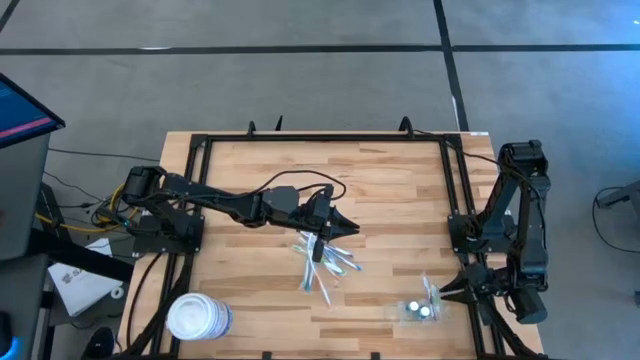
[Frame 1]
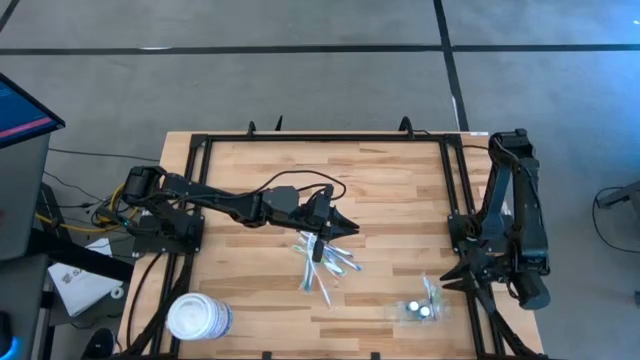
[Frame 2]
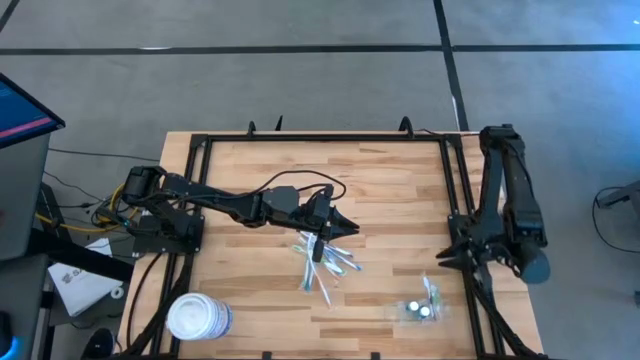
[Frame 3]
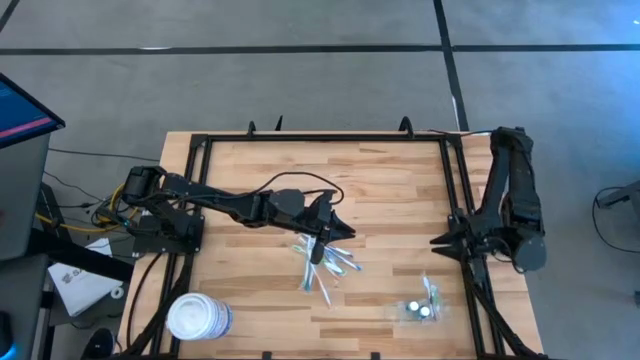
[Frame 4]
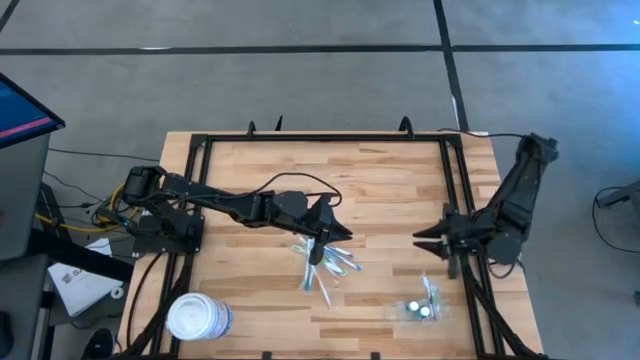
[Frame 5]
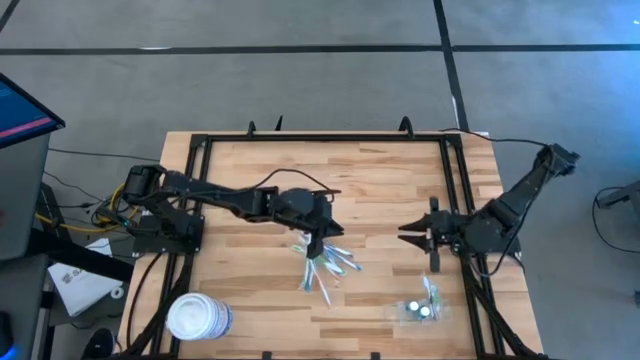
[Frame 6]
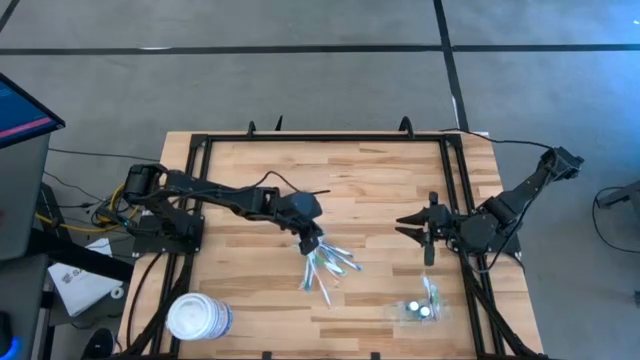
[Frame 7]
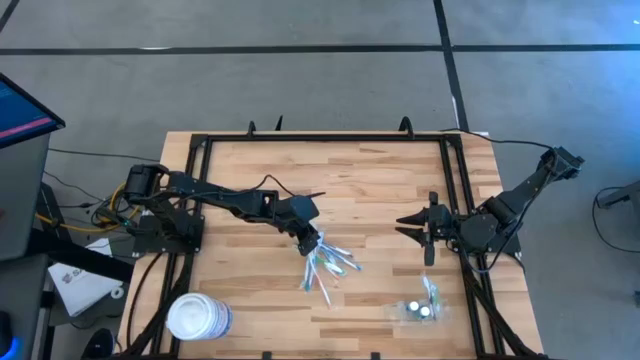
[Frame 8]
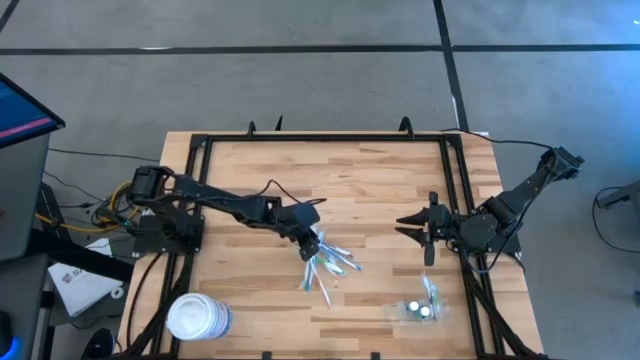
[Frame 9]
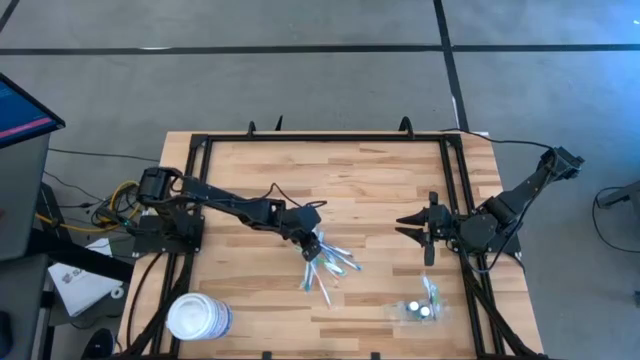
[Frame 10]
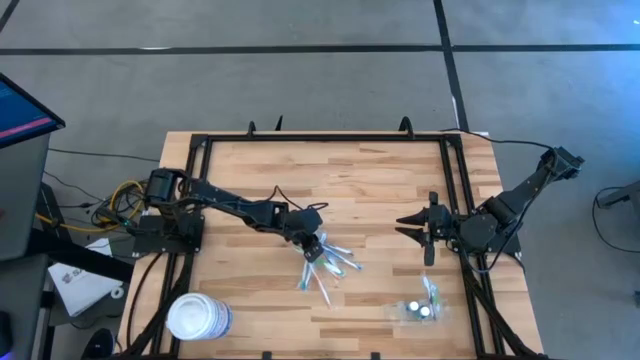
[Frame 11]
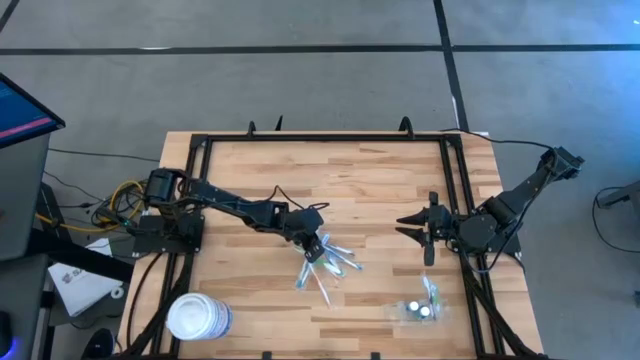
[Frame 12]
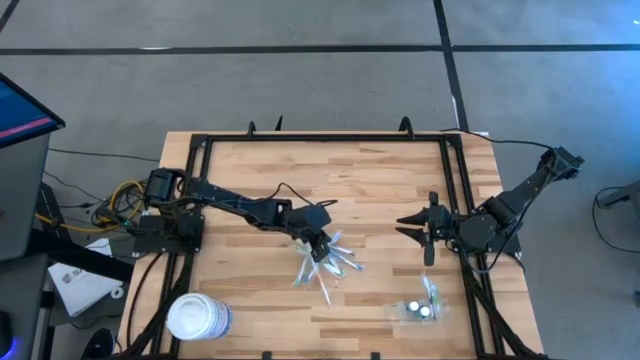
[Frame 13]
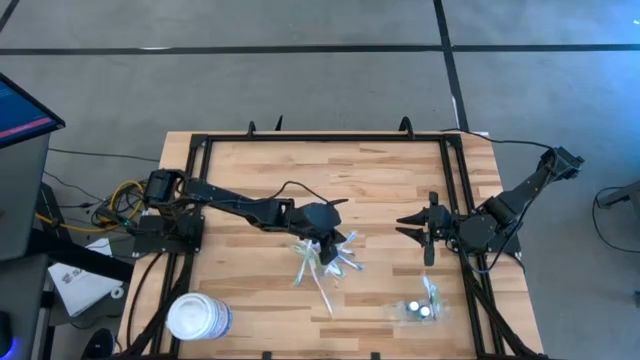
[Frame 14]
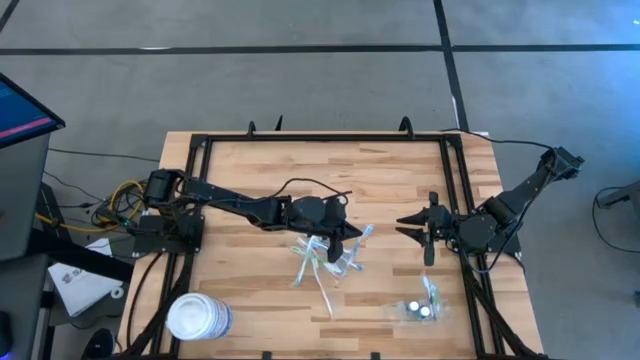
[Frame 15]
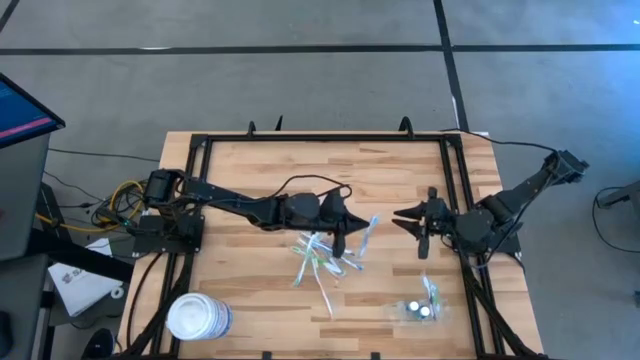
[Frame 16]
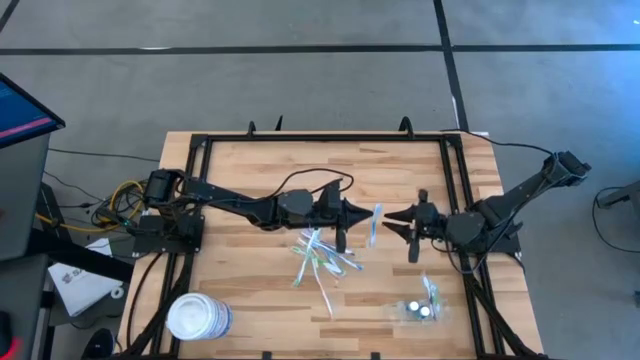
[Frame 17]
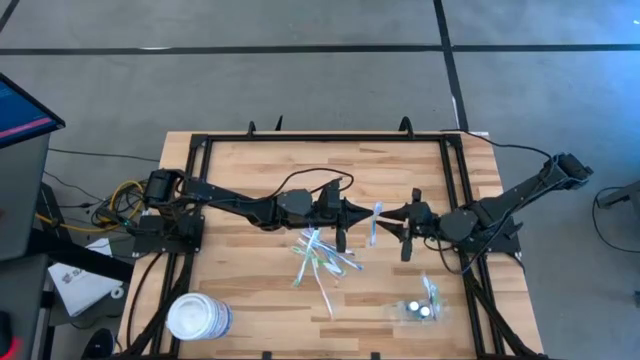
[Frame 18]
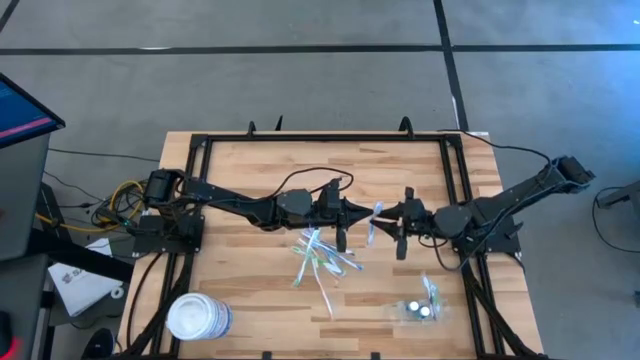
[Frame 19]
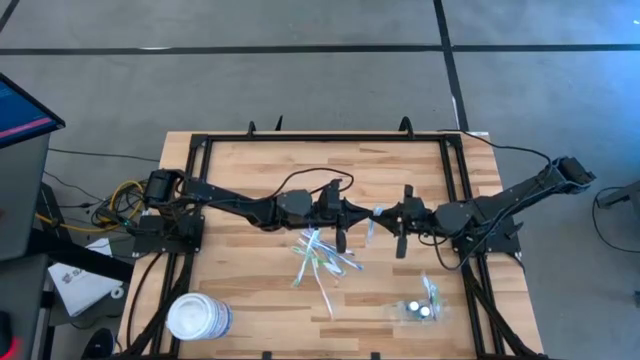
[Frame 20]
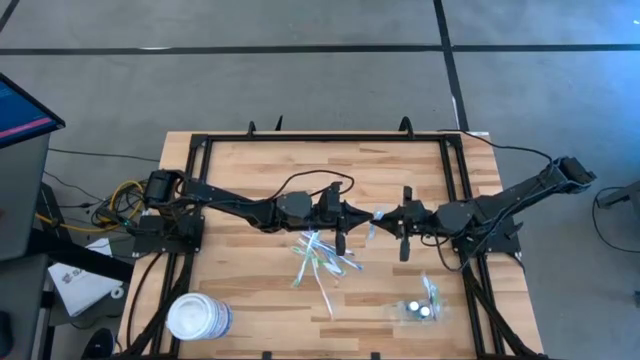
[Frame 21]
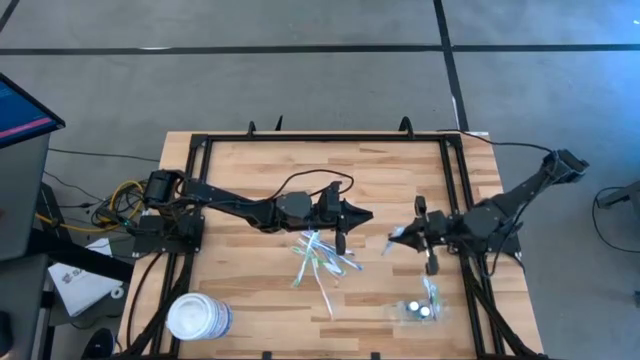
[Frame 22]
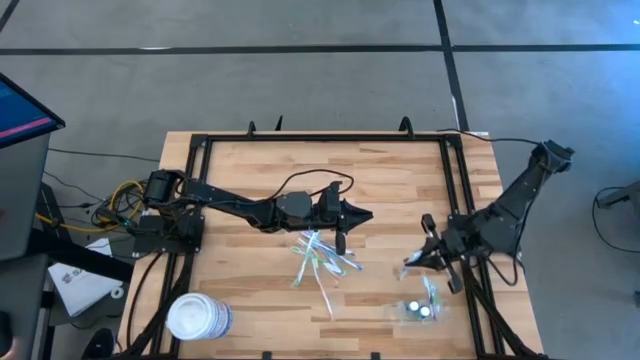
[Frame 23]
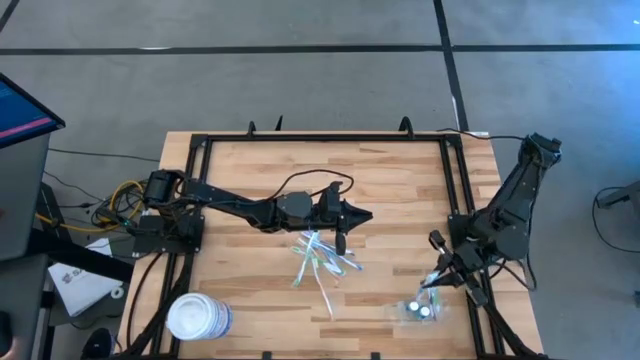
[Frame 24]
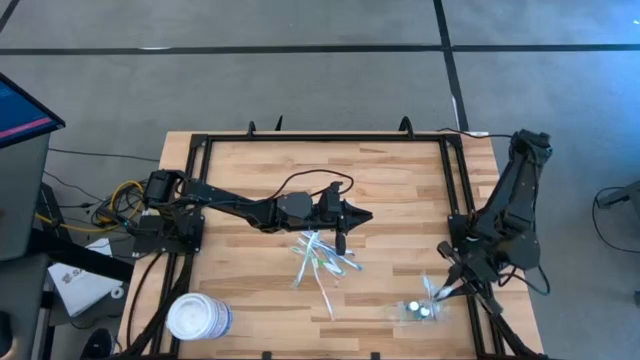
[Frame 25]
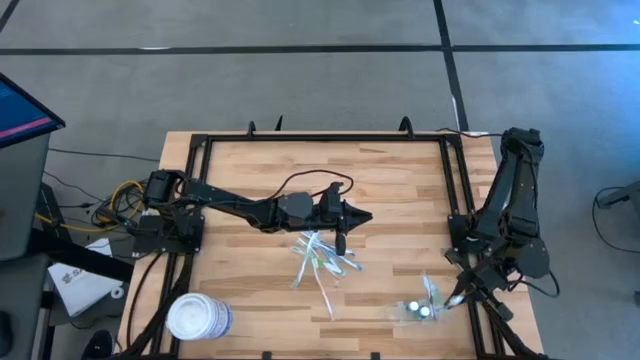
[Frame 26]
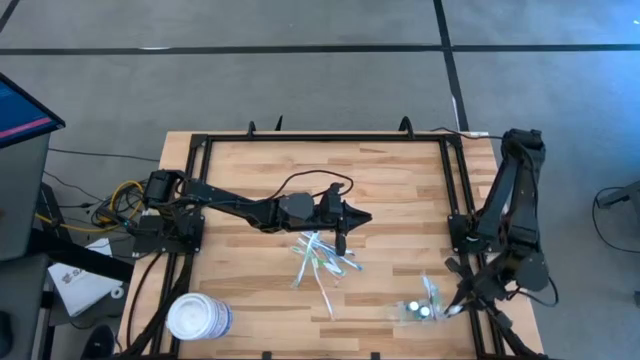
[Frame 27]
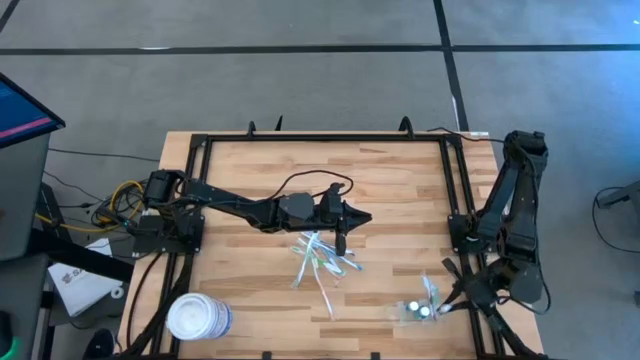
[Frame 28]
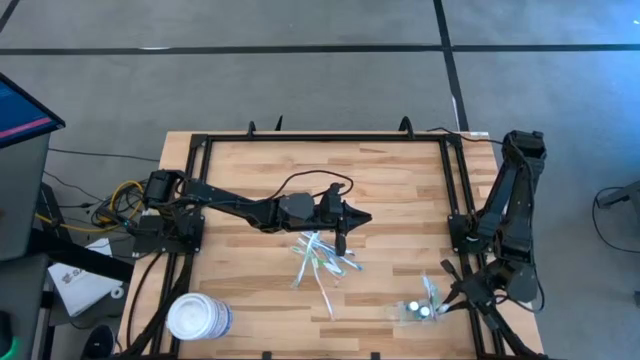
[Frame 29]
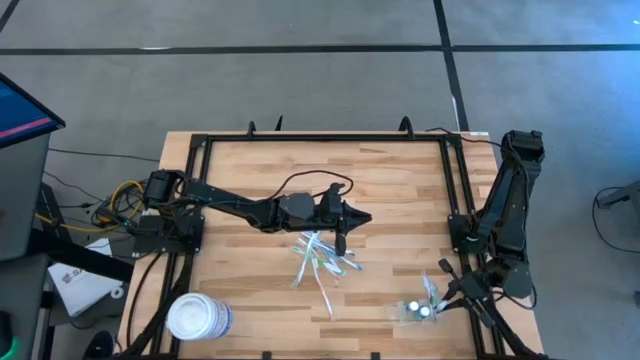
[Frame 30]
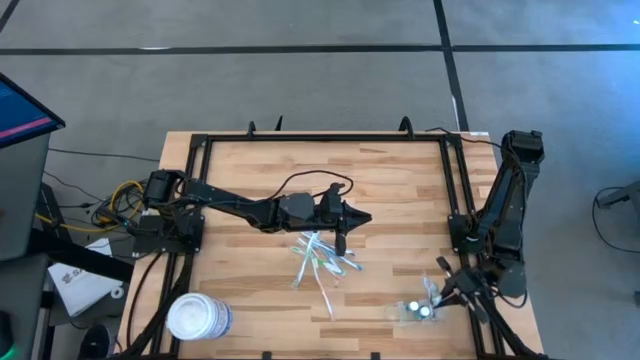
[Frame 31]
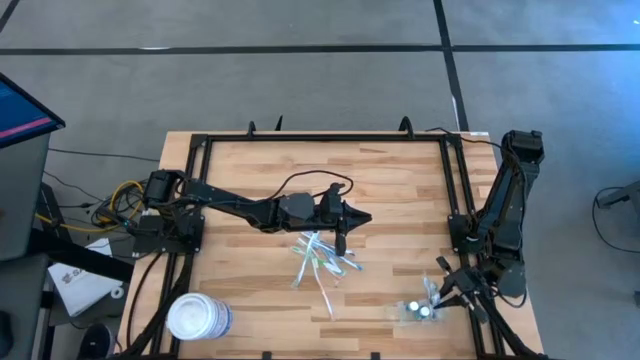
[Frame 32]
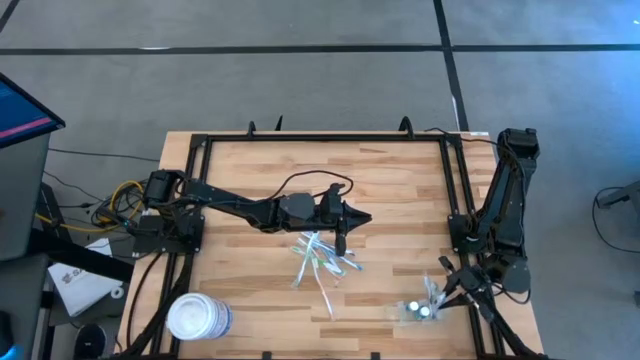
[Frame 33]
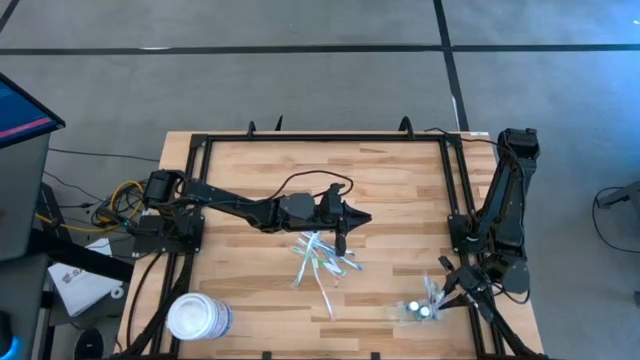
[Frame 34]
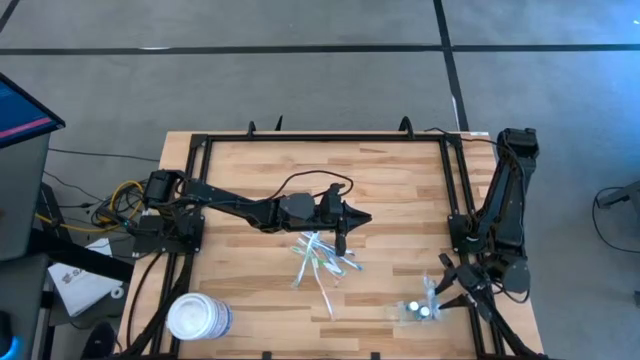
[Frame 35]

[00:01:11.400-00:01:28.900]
Task: Pick & Place toothbrushing station
Put the blue toothbrush into the transparent organizer

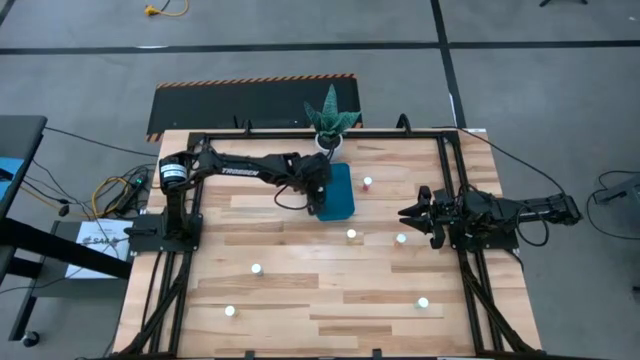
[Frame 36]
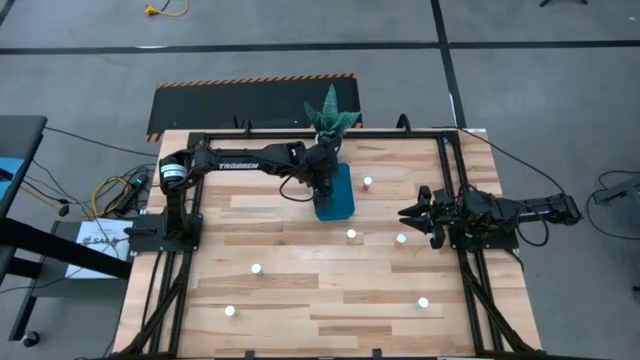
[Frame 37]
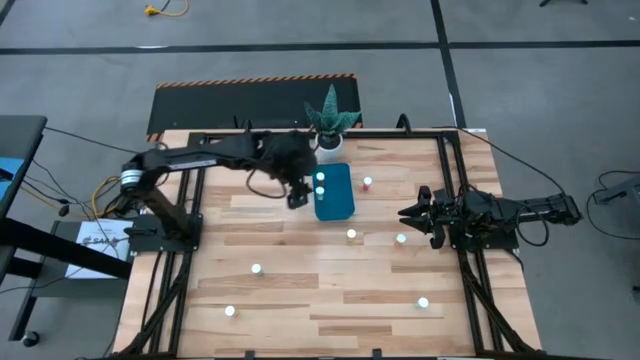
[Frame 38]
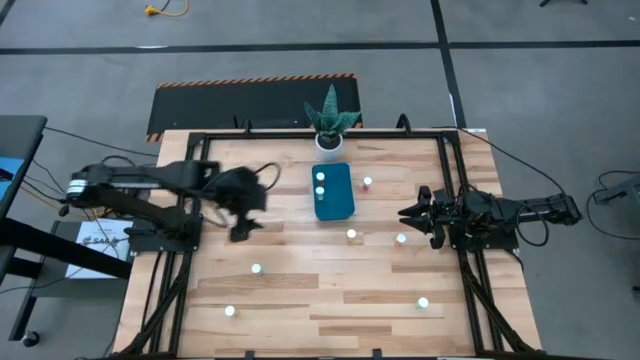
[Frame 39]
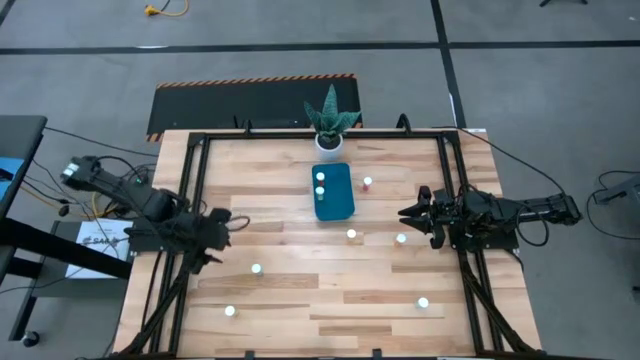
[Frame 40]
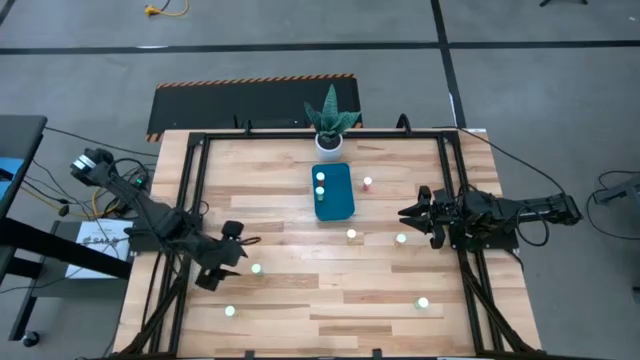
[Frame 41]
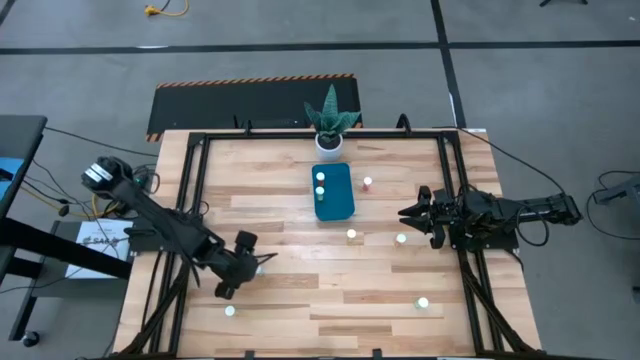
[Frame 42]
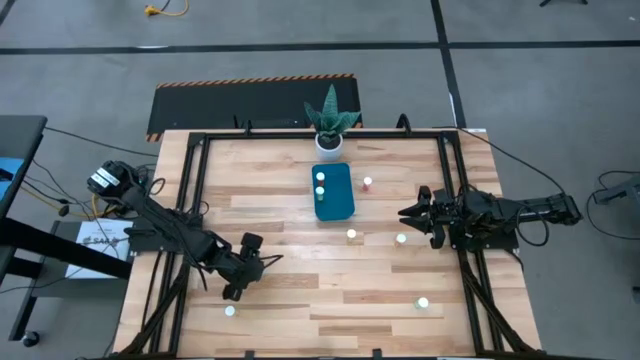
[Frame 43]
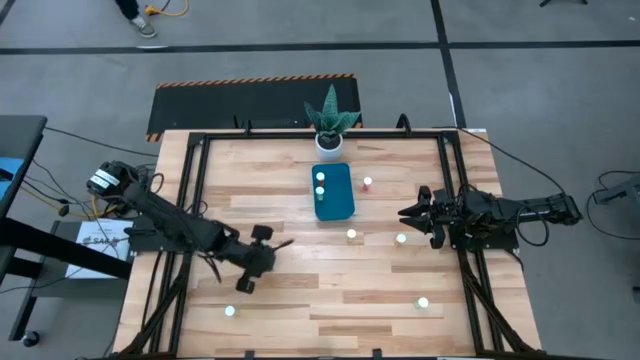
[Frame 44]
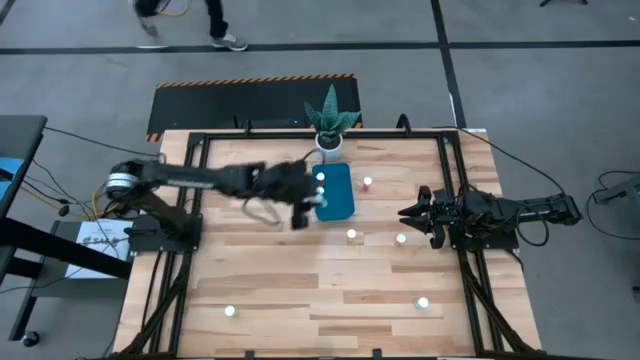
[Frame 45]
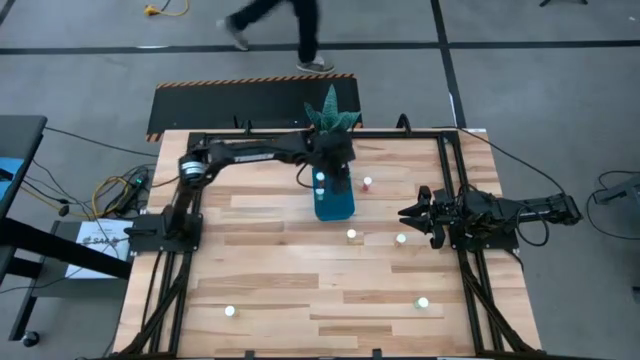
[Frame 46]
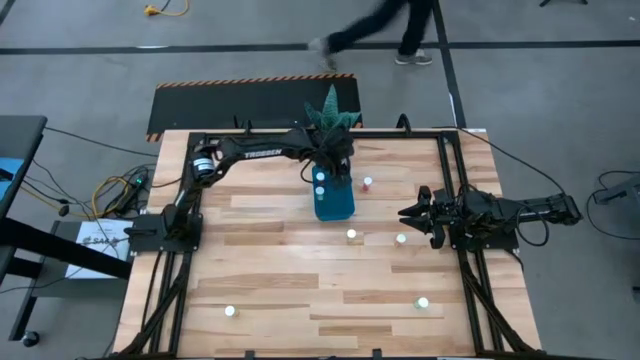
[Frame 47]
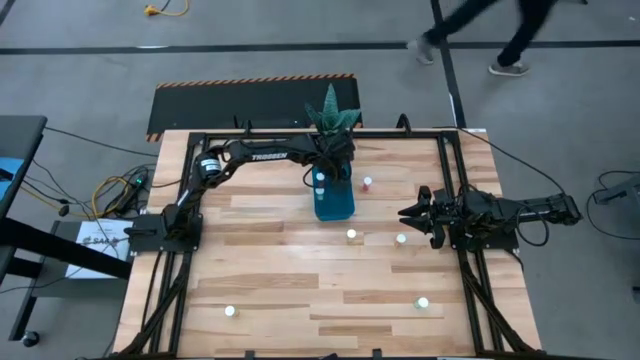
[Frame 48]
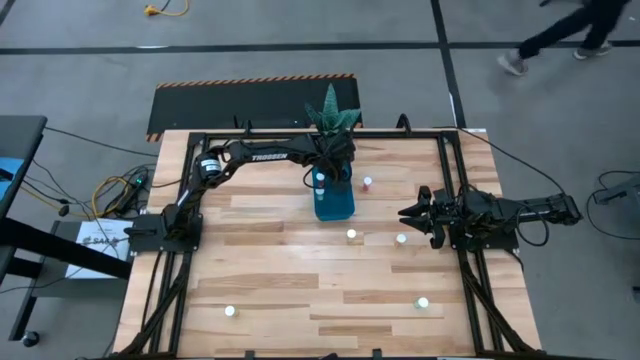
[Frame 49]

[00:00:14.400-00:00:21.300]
Task: Pick and place pill bottles into a basket
Put the left blue pill bottle into the blue container
